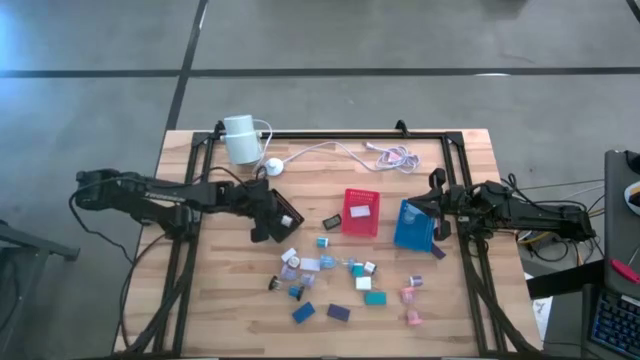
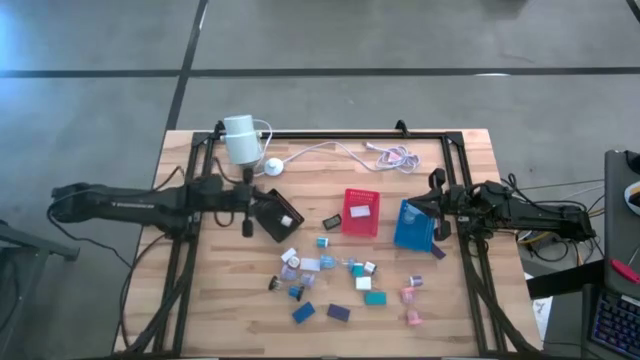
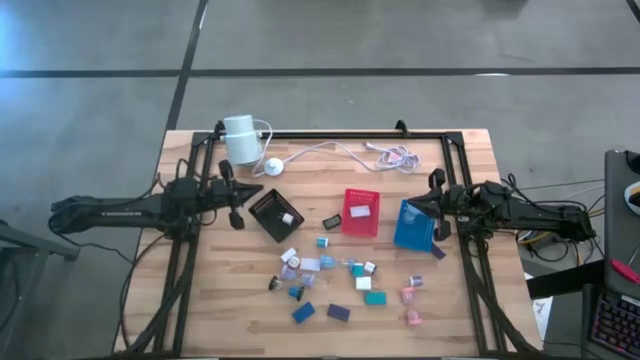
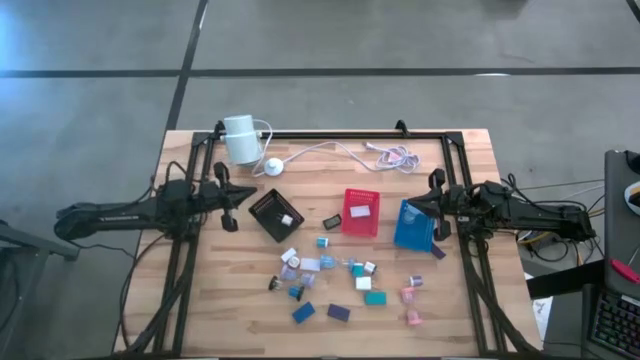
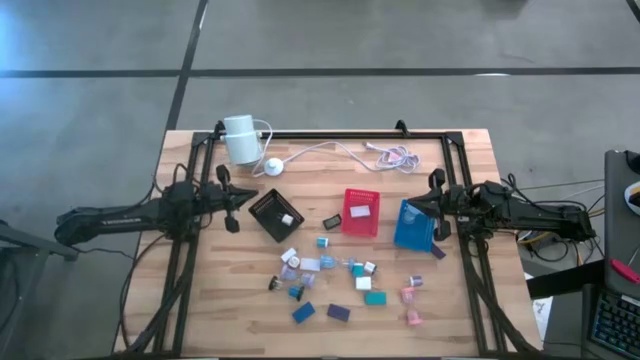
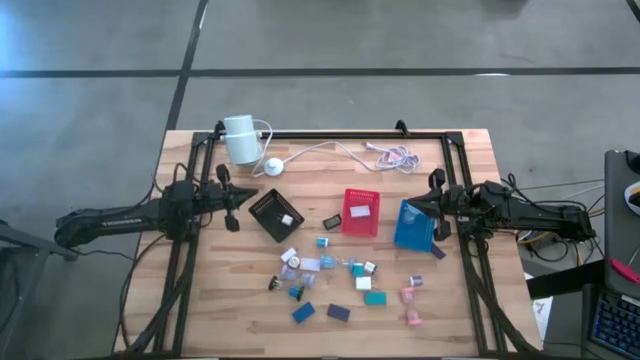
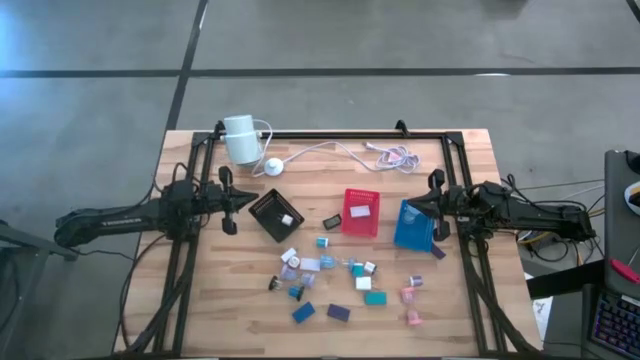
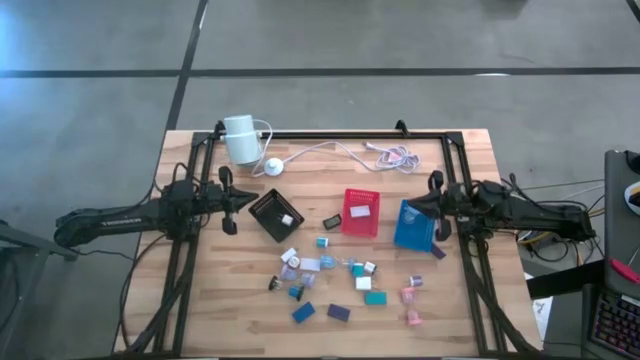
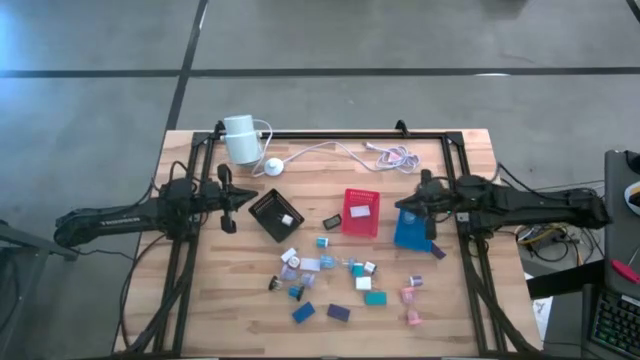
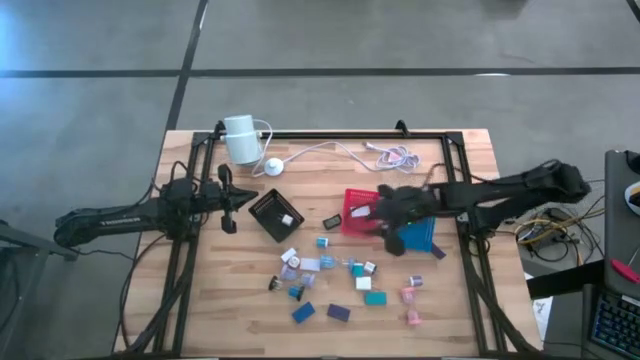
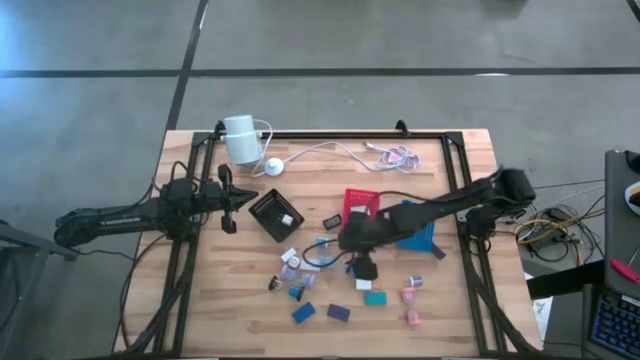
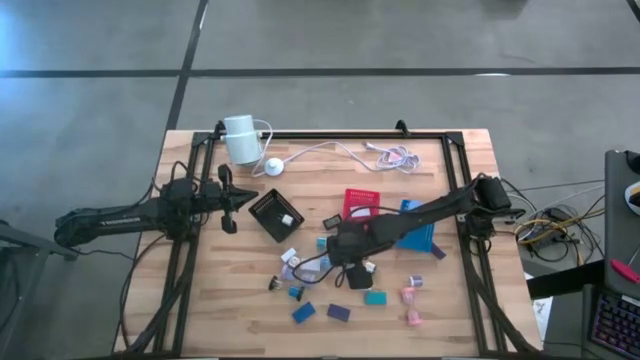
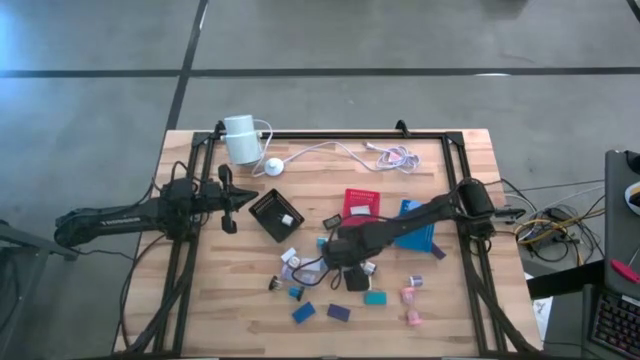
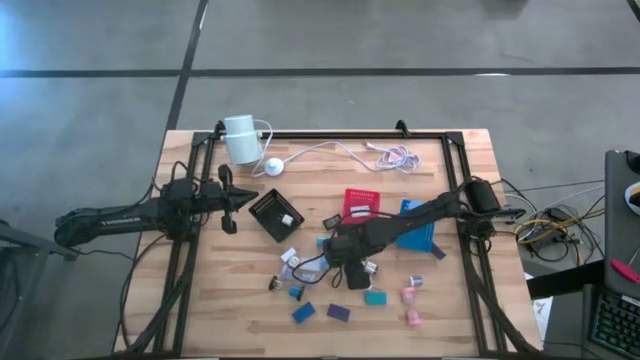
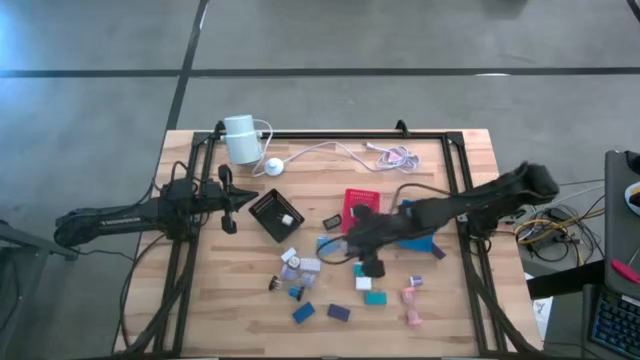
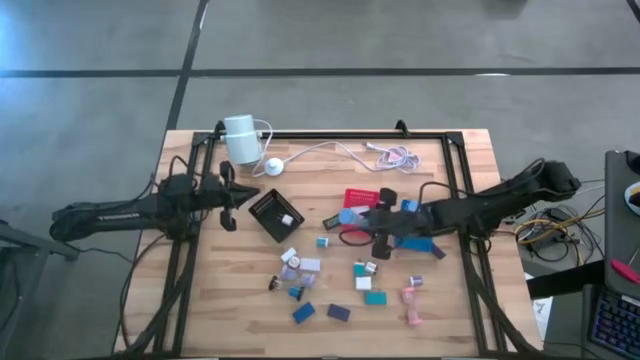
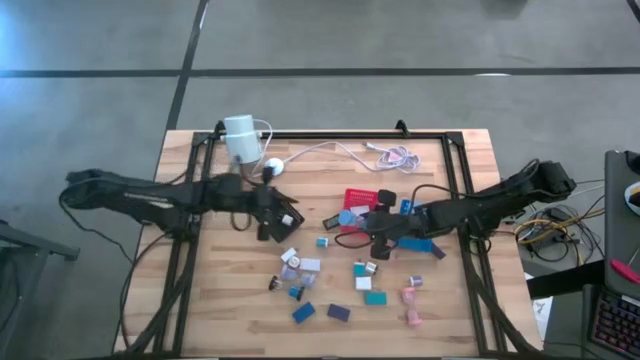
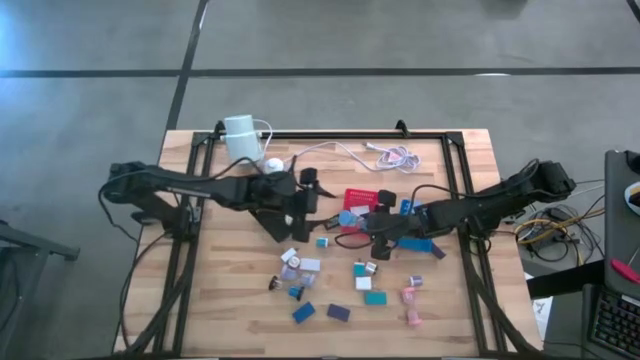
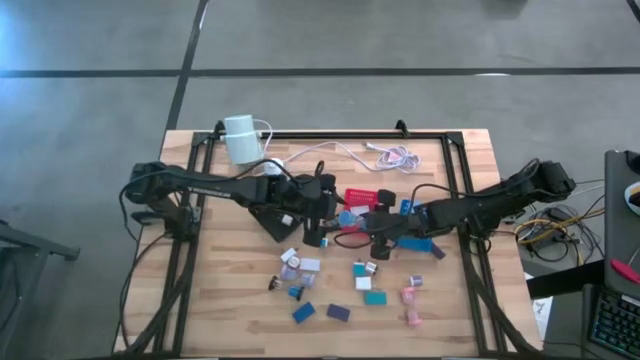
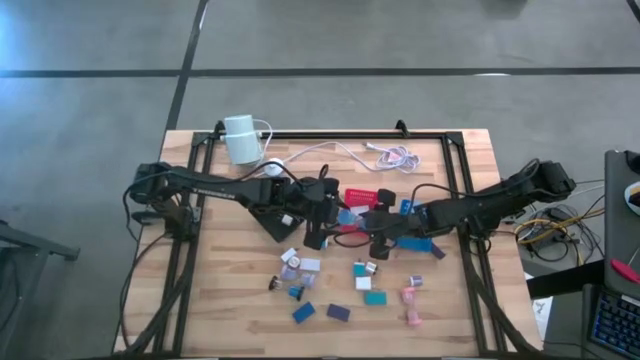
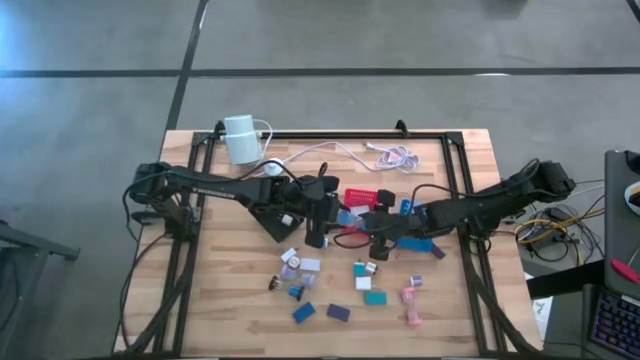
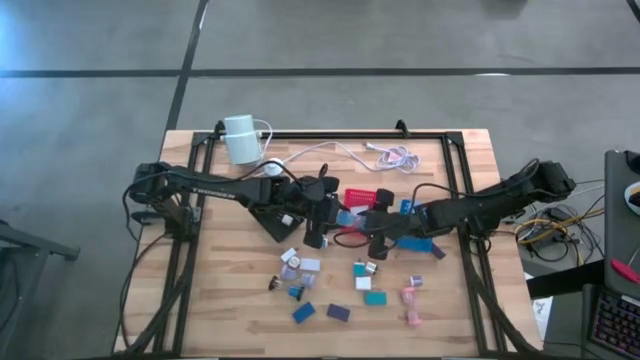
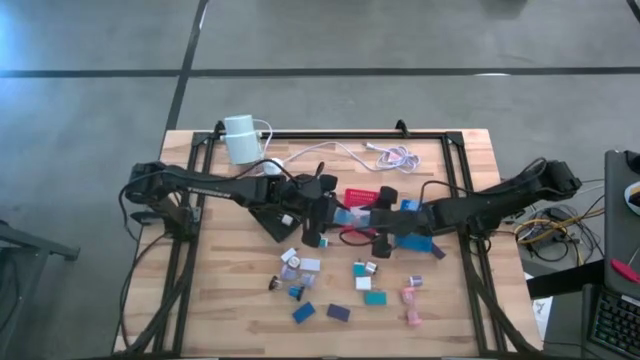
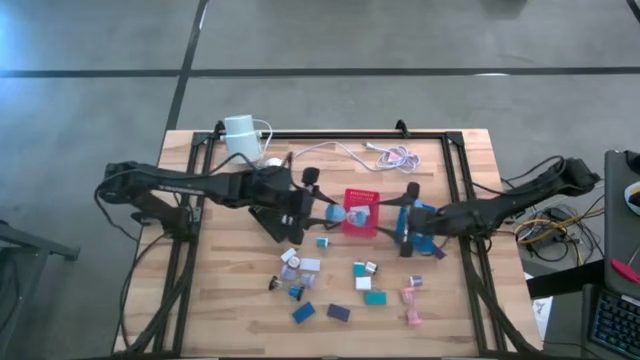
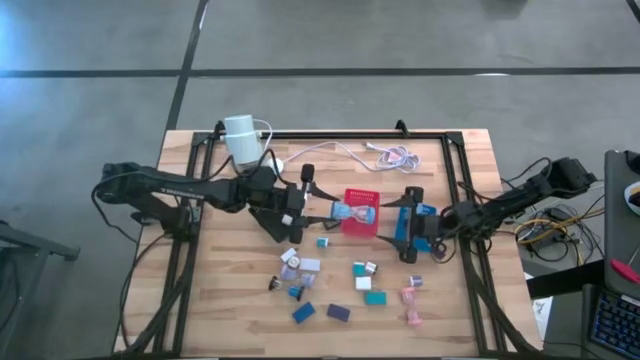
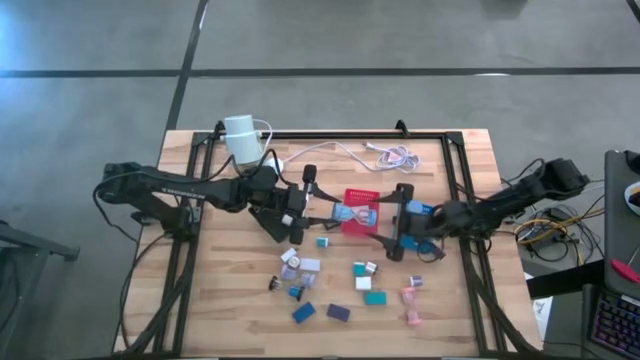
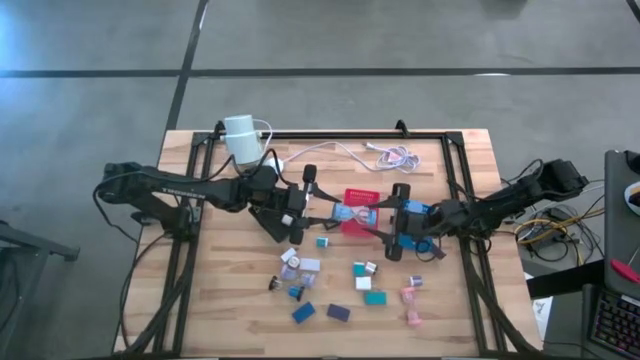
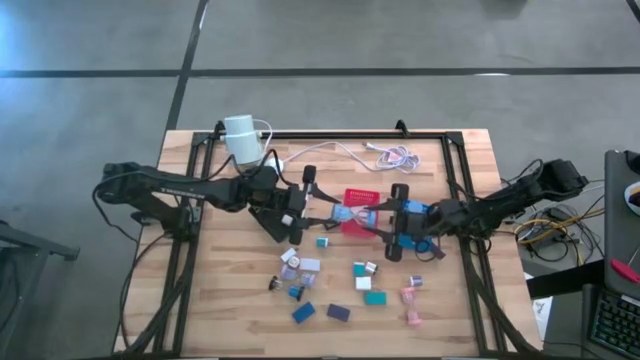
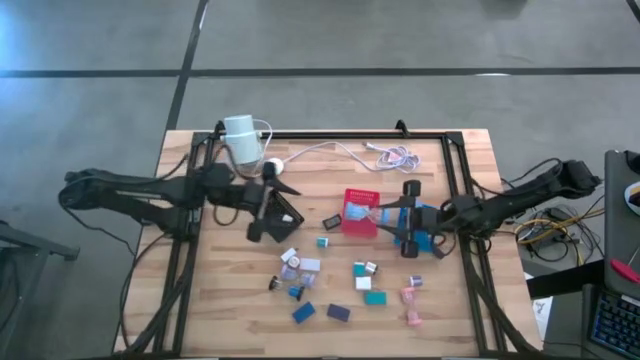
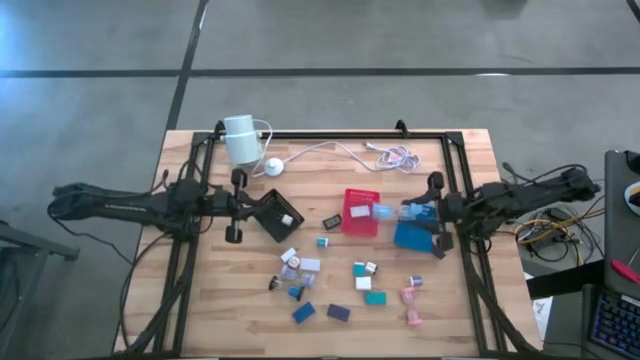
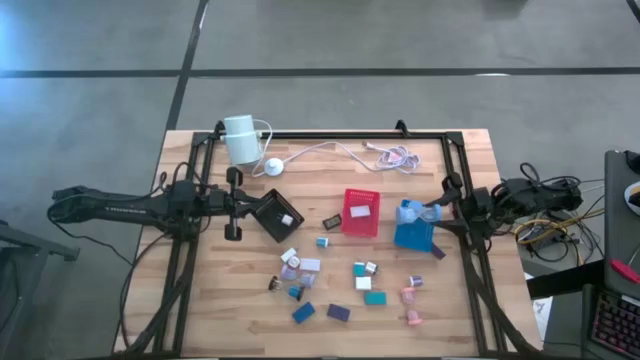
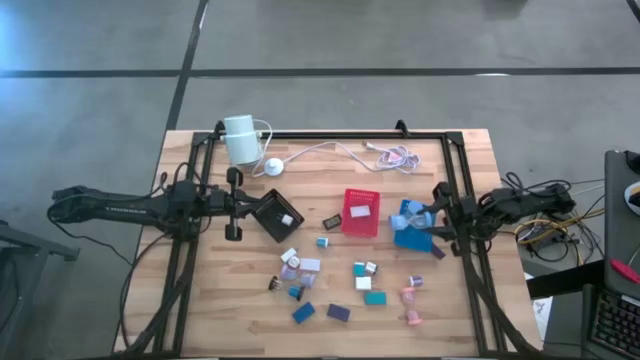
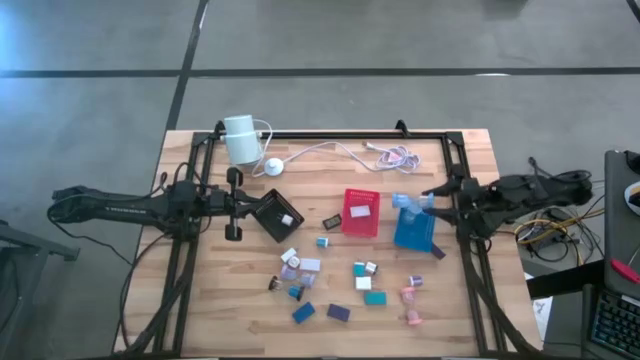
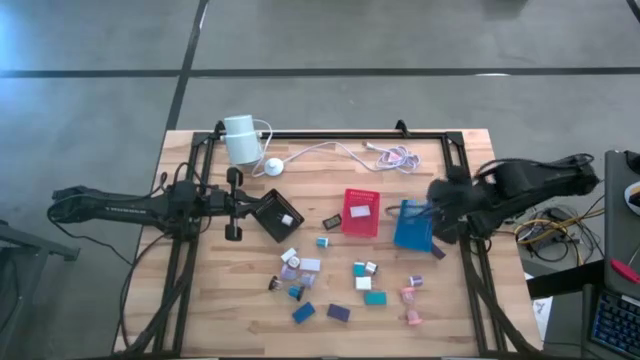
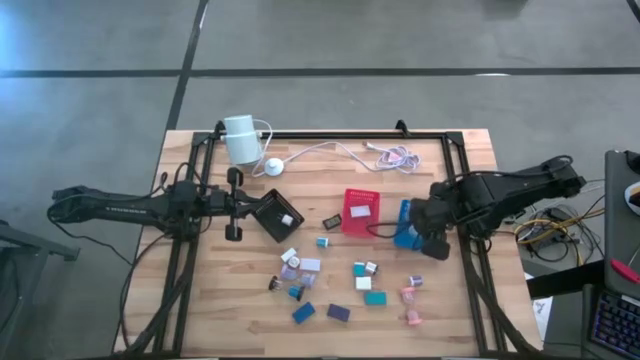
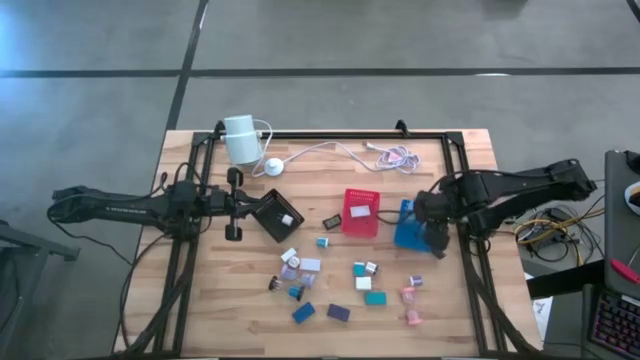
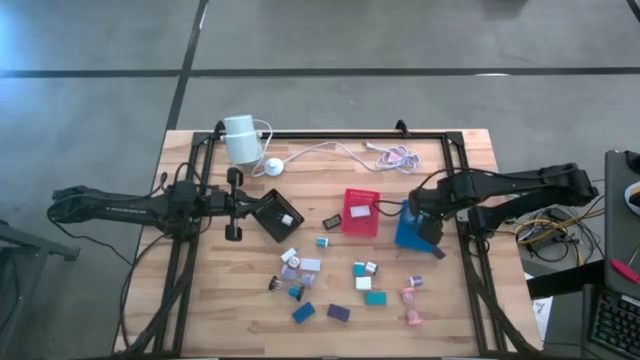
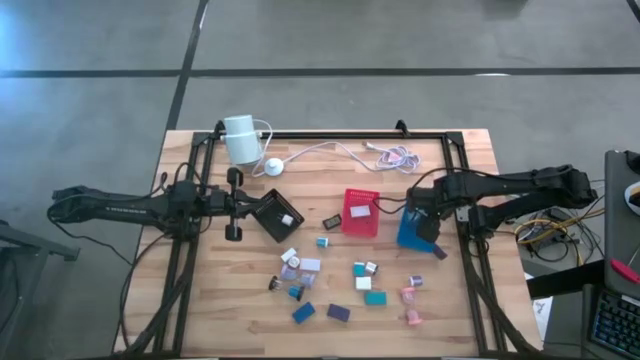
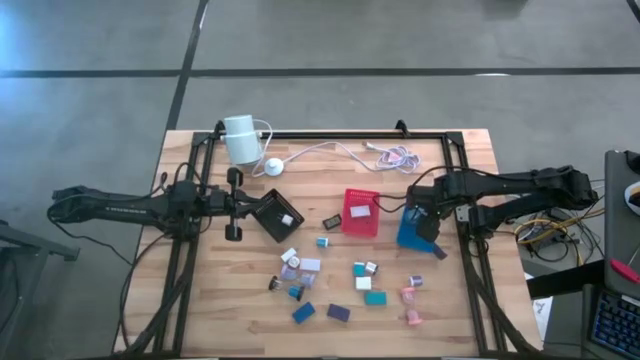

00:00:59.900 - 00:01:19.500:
Task: Pick & Place Office items
Put the light blue hourglass into the blue bin
